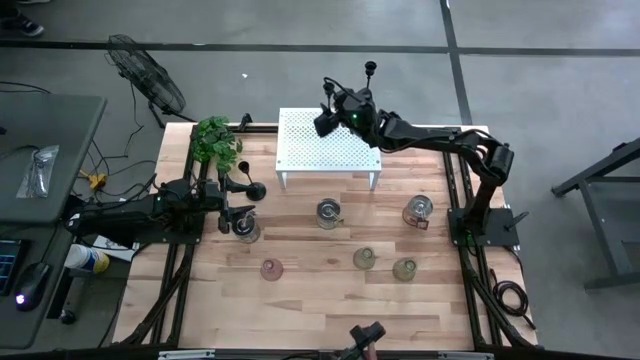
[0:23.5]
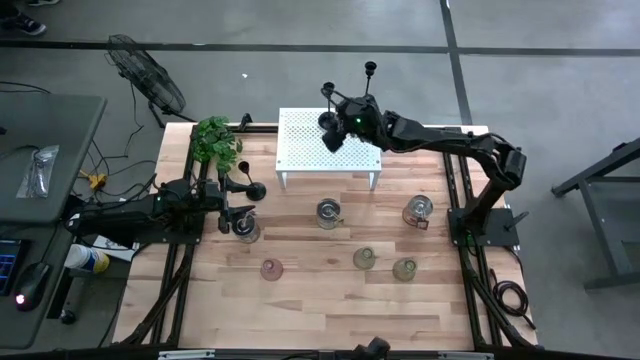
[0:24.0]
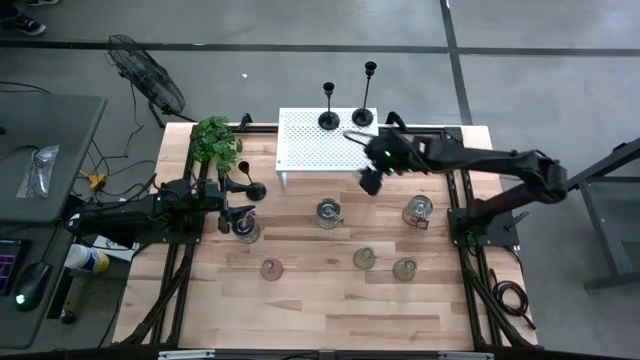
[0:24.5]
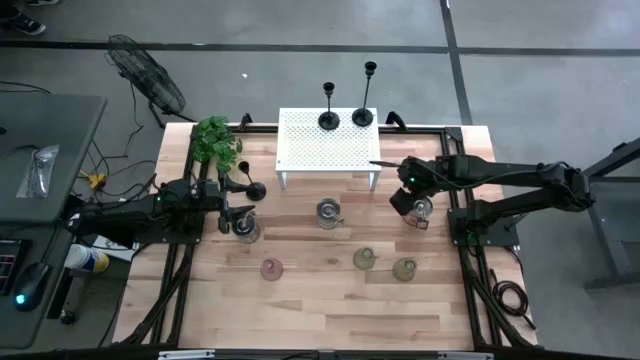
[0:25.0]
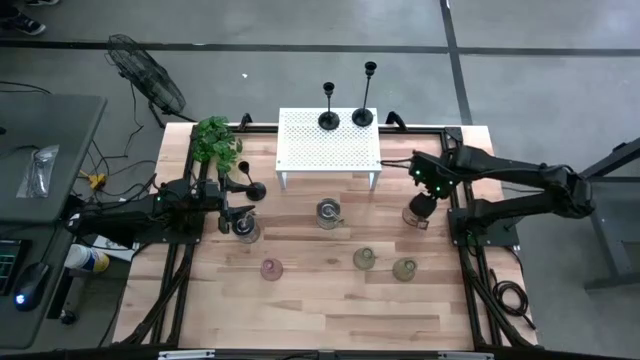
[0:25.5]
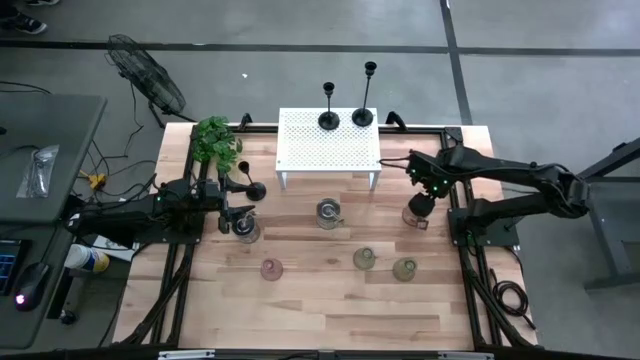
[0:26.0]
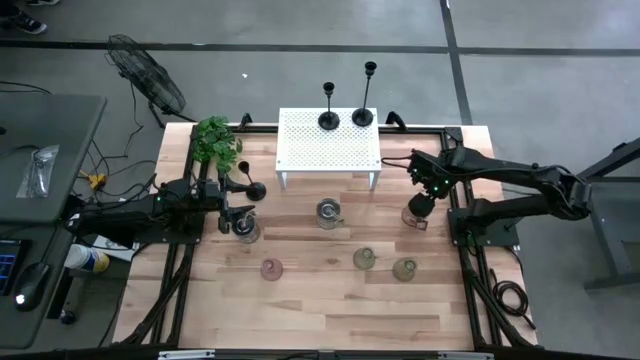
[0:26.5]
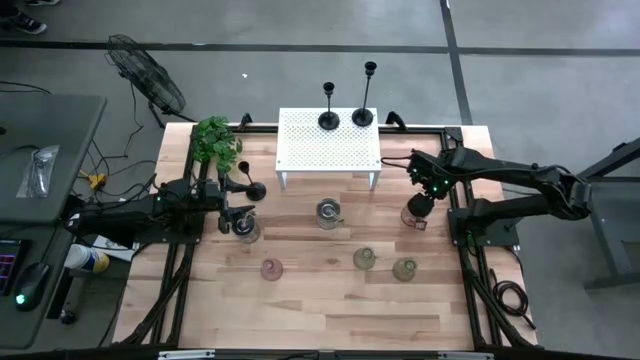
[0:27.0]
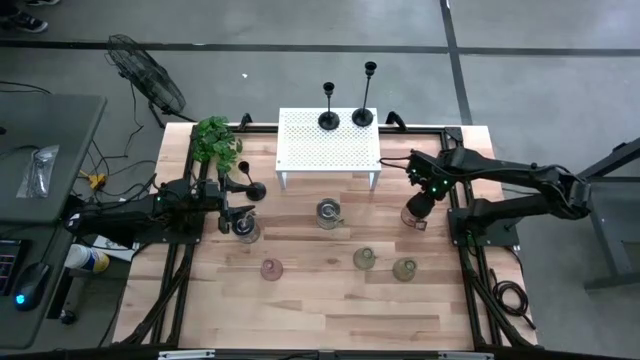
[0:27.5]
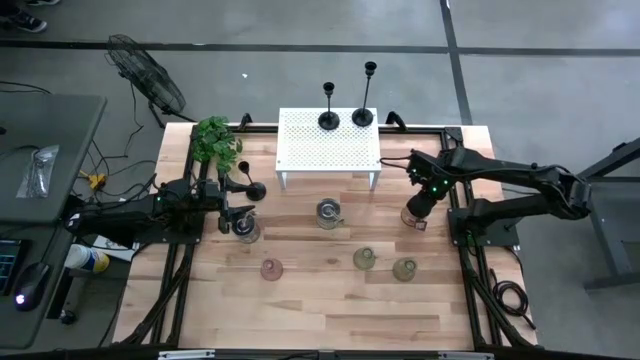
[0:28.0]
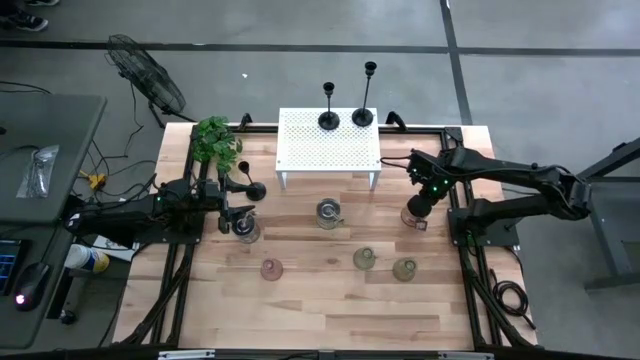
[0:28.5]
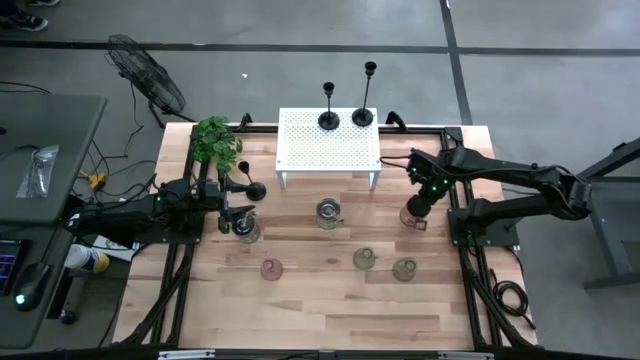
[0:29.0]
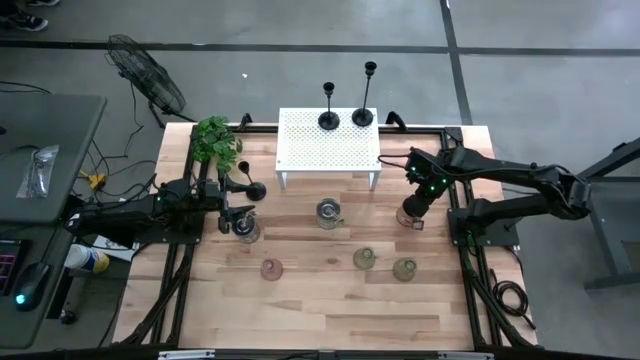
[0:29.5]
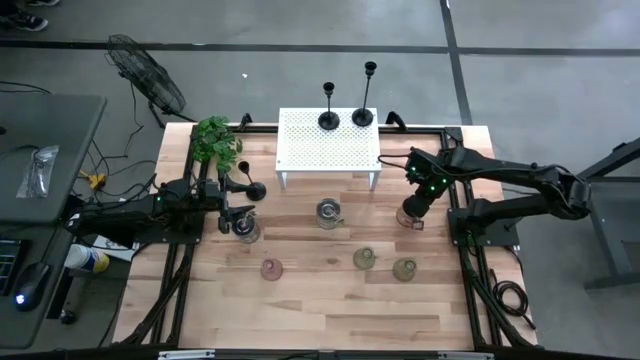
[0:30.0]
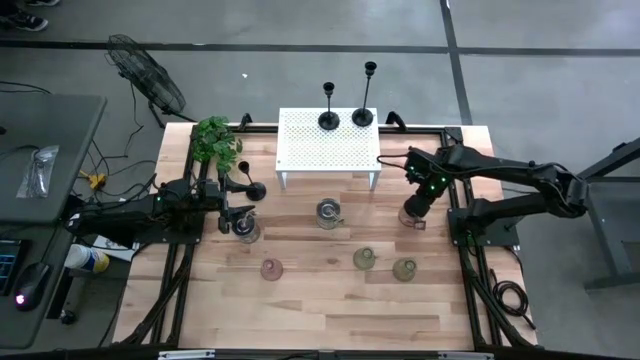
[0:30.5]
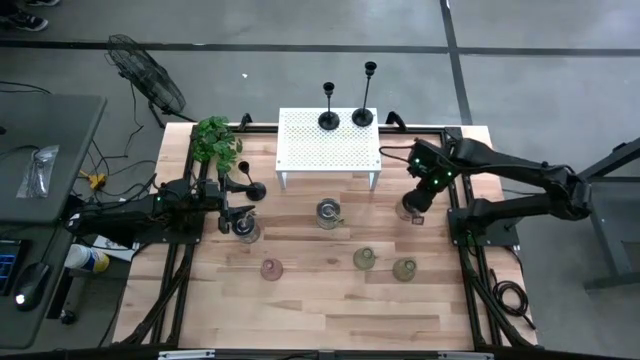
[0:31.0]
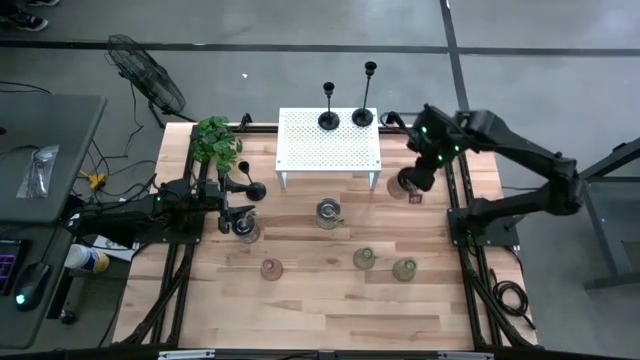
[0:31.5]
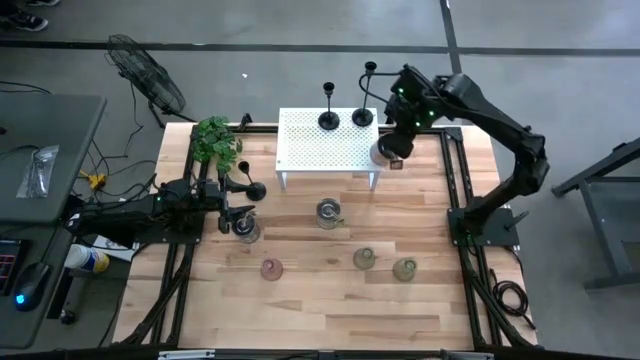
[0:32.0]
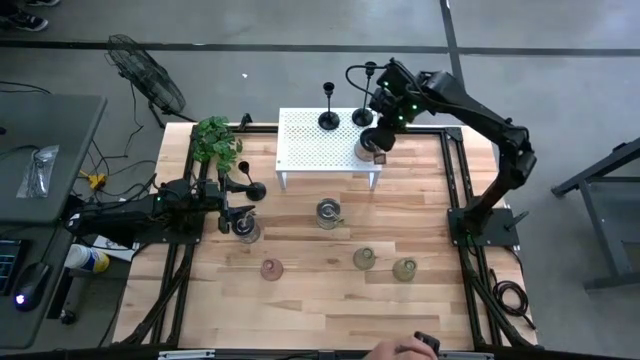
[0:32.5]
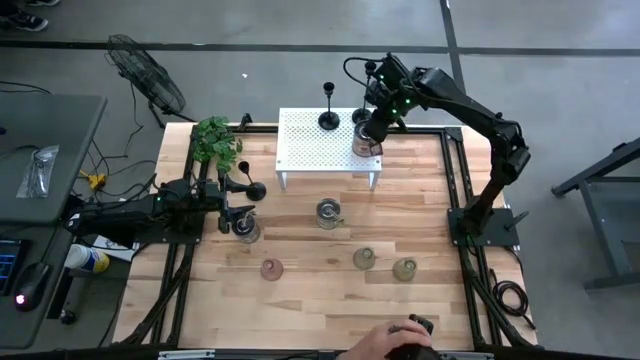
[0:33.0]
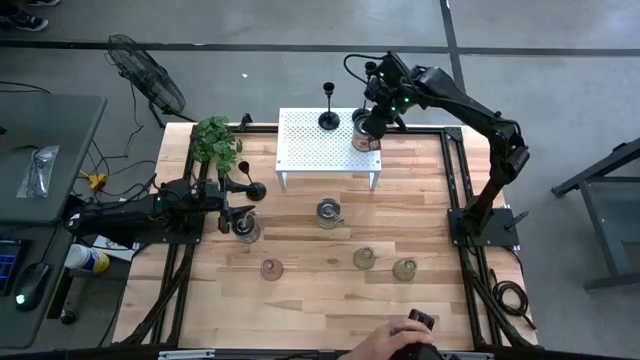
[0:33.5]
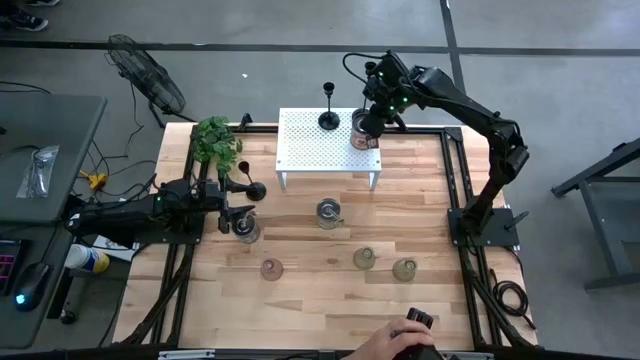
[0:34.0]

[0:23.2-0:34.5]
Task: Pick & Place candle stick holders
Put the orange scented candle on the shelf

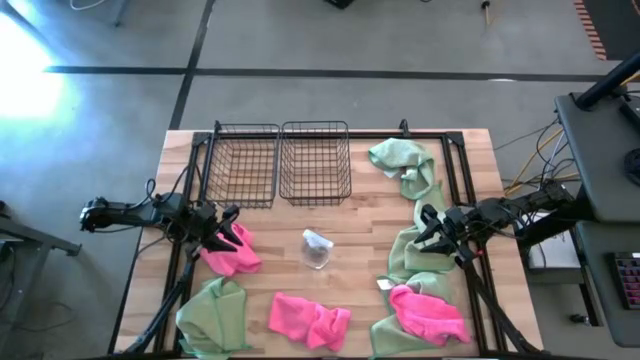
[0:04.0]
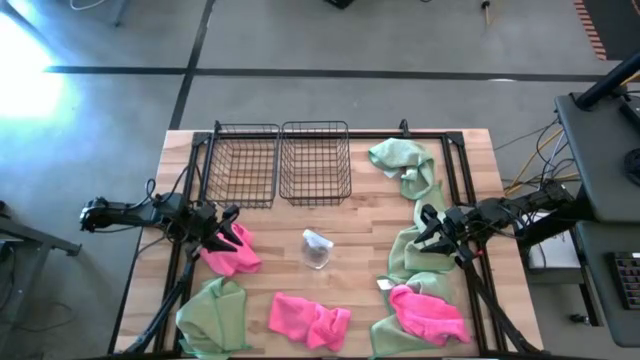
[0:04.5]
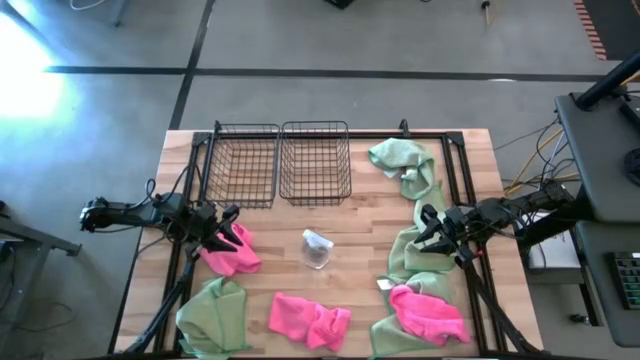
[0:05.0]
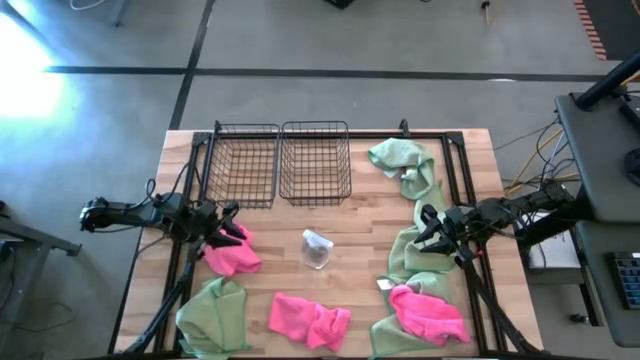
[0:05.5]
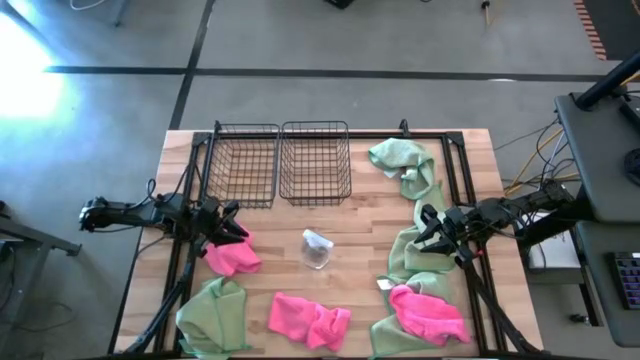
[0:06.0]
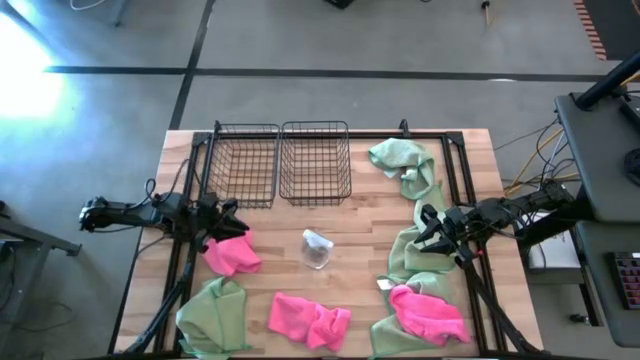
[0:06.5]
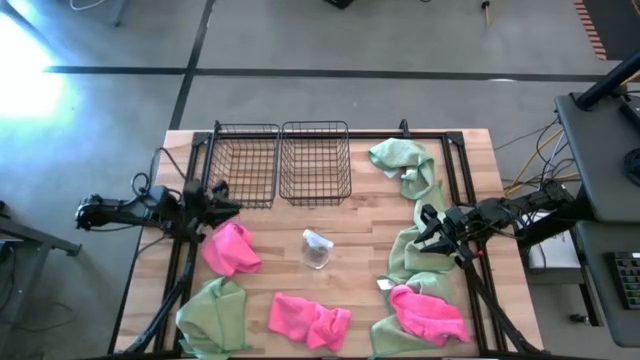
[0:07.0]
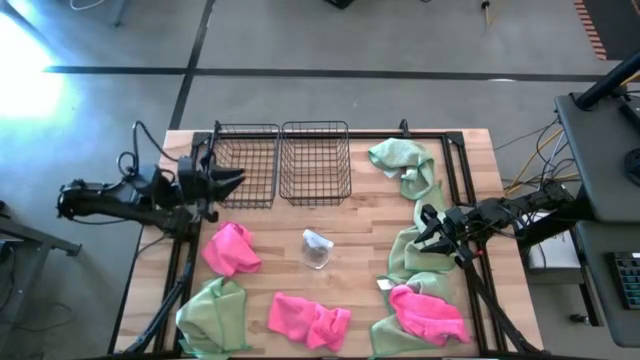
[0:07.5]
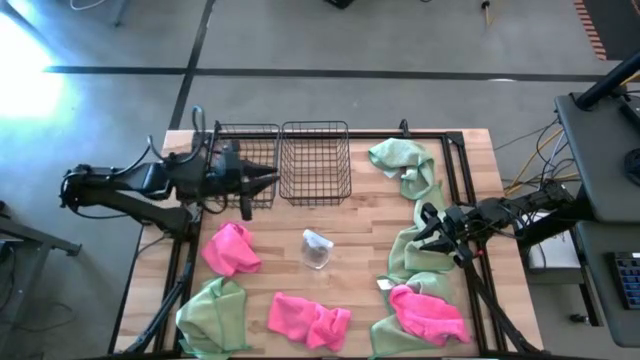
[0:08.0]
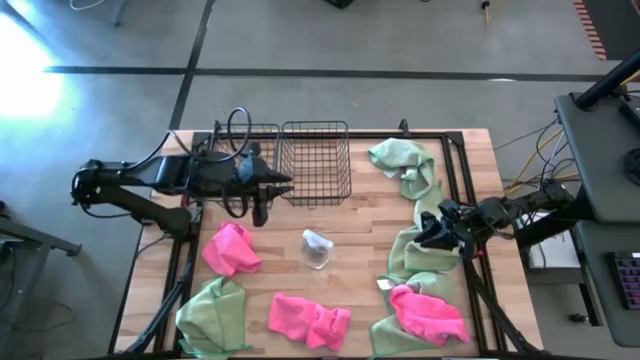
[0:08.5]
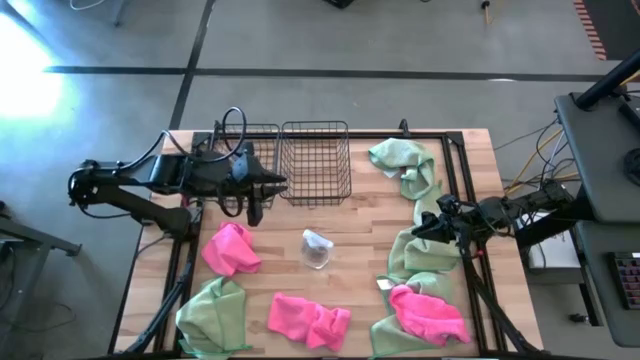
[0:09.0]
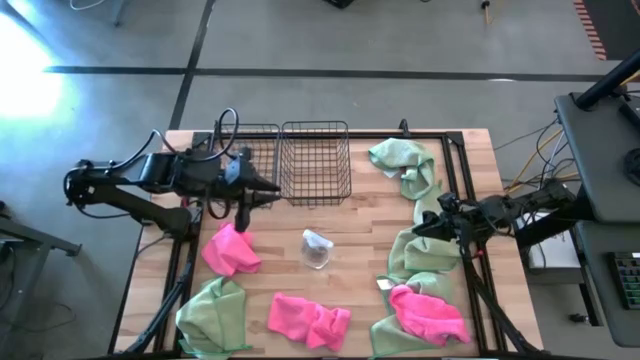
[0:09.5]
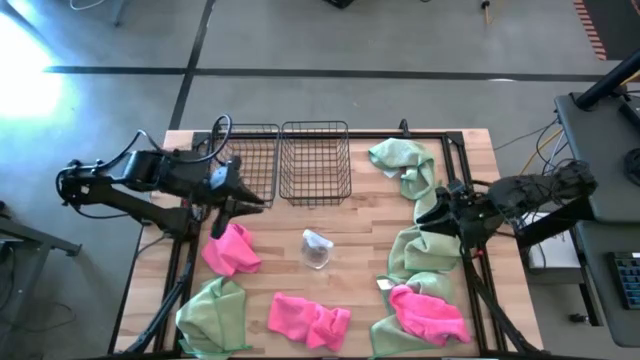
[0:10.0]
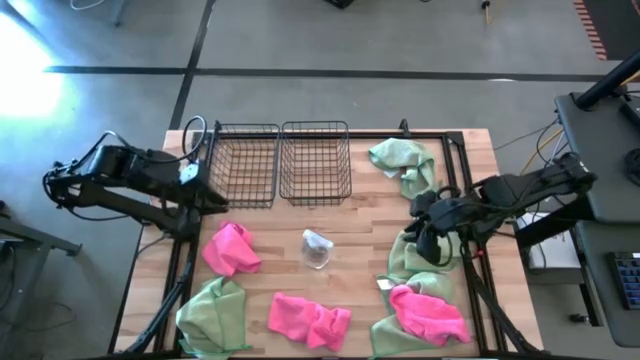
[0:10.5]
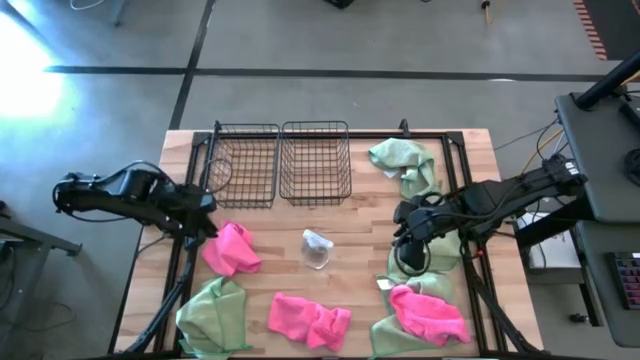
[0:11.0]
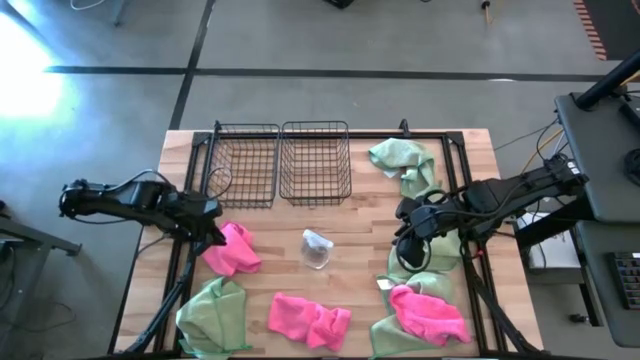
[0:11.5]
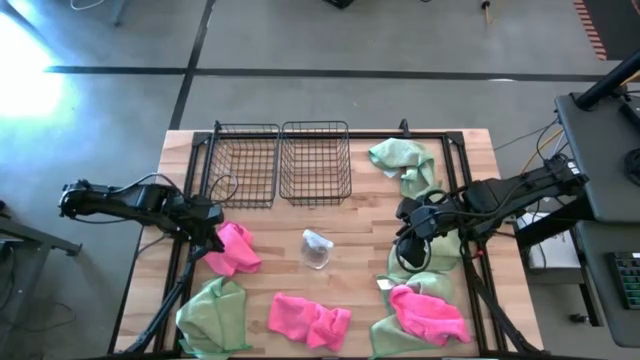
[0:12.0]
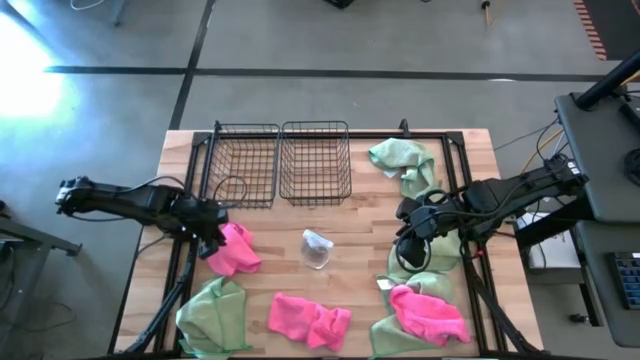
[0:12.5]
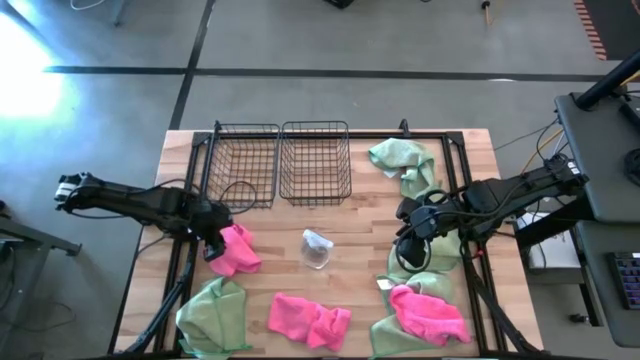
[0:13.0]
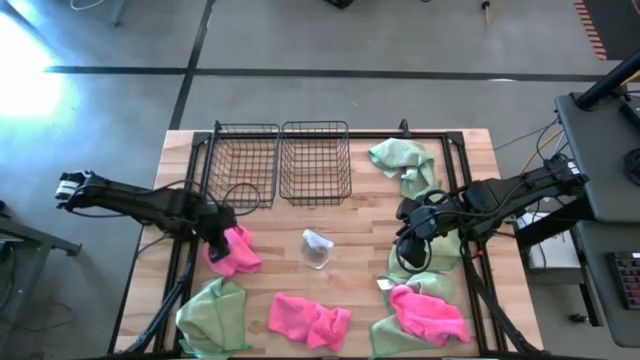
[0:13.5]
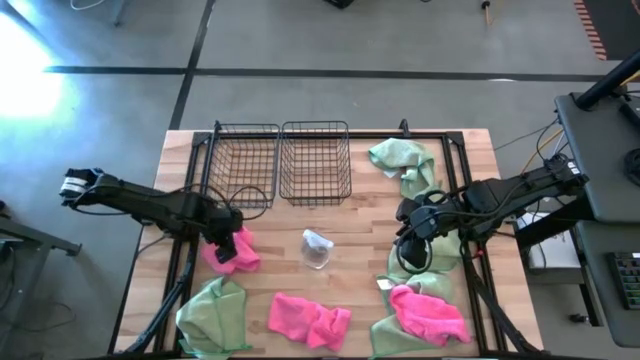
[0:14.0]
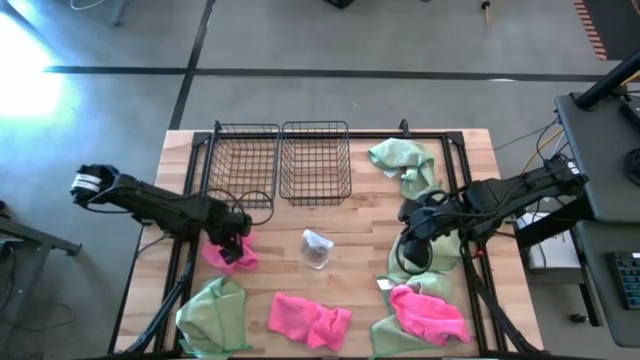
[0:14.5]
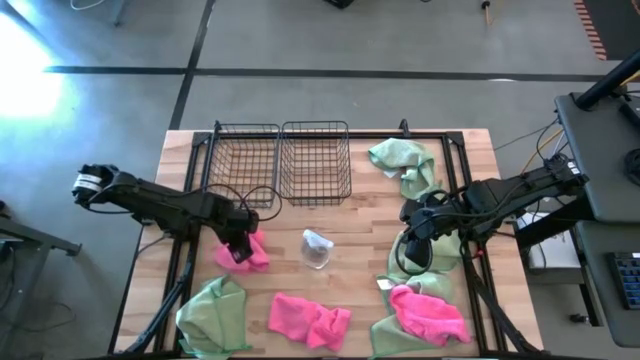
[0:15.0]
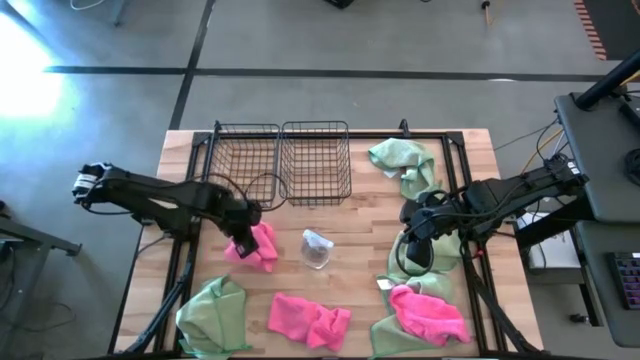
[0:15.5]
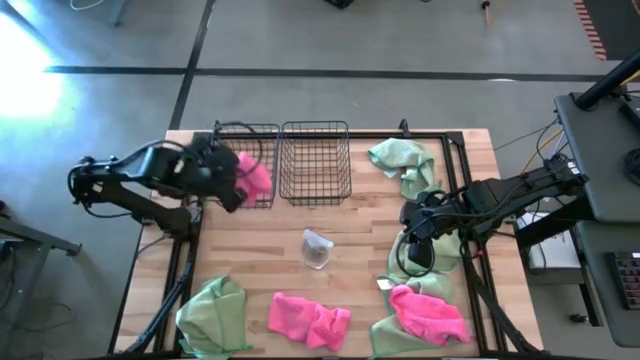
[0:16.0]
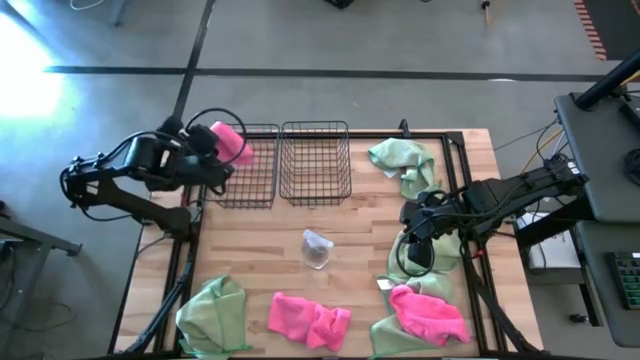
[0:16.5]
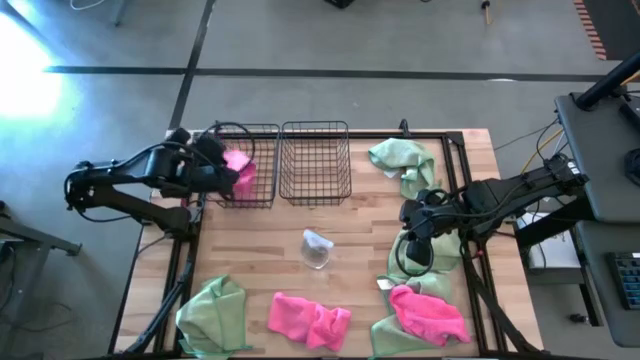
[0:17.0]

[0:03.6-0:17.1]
Task: Sort microfiber towel by color & place in baskets
Put the top pink microfiber towel into the left black wire basket
